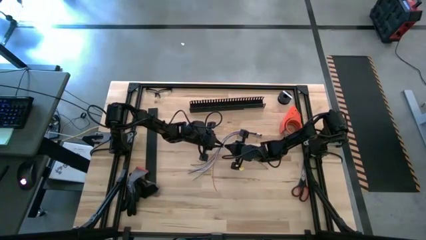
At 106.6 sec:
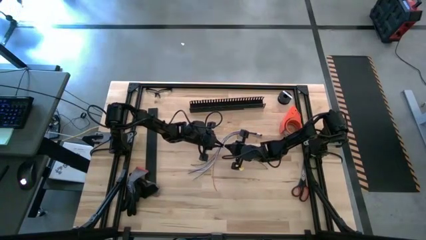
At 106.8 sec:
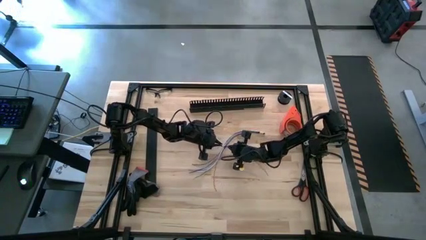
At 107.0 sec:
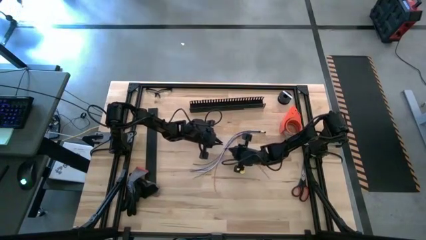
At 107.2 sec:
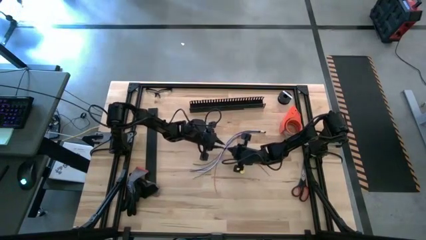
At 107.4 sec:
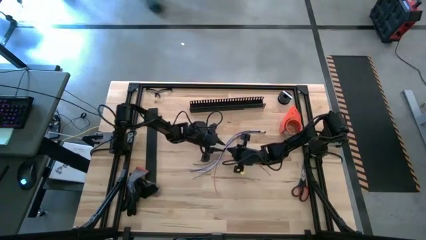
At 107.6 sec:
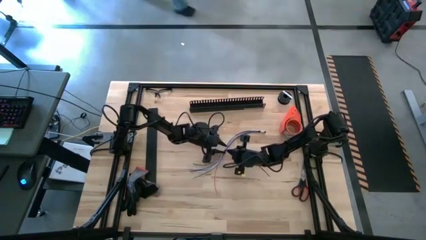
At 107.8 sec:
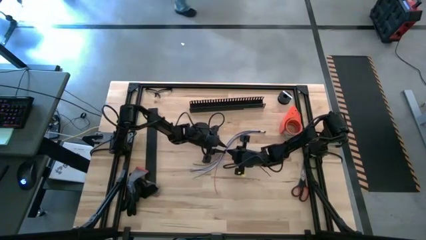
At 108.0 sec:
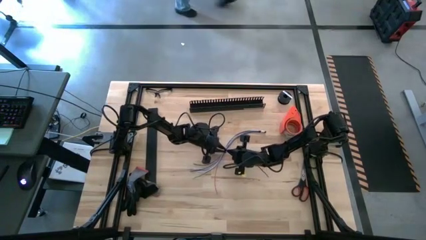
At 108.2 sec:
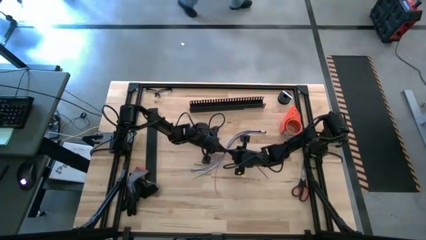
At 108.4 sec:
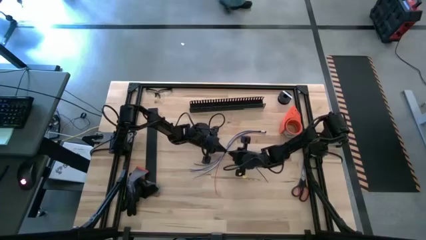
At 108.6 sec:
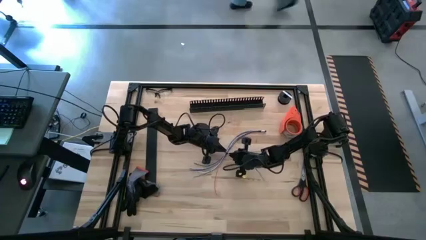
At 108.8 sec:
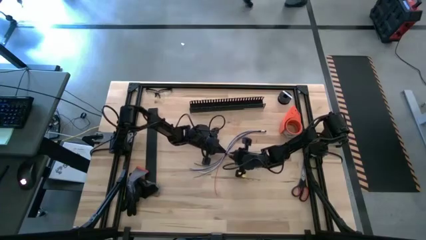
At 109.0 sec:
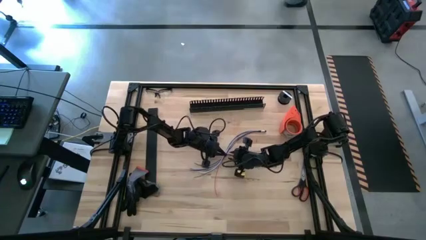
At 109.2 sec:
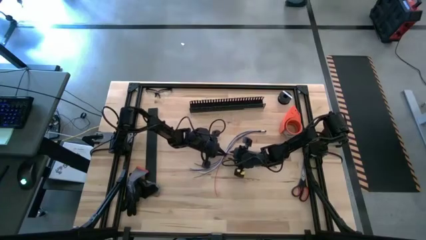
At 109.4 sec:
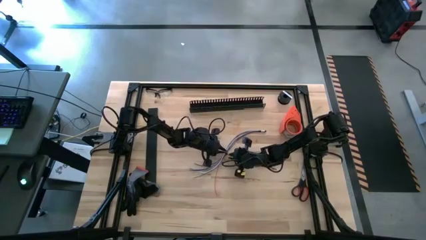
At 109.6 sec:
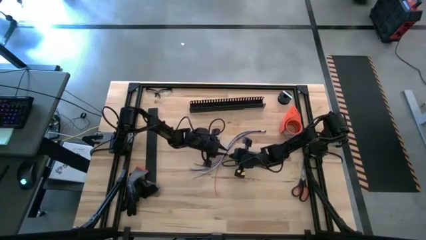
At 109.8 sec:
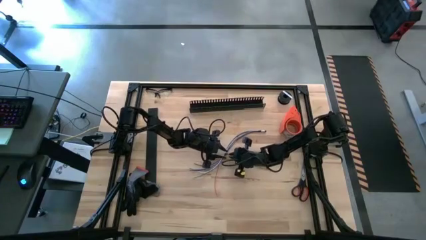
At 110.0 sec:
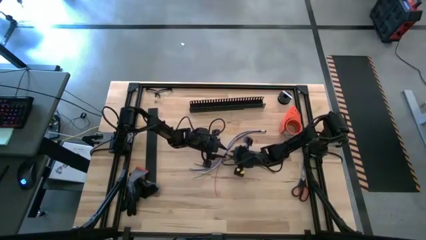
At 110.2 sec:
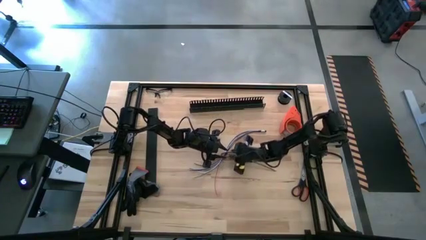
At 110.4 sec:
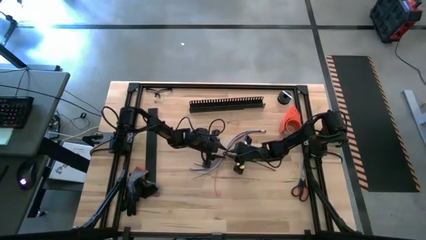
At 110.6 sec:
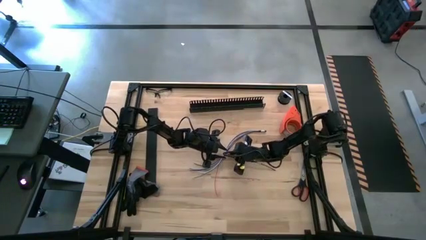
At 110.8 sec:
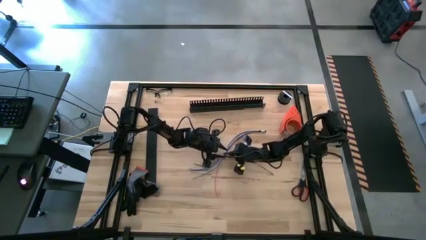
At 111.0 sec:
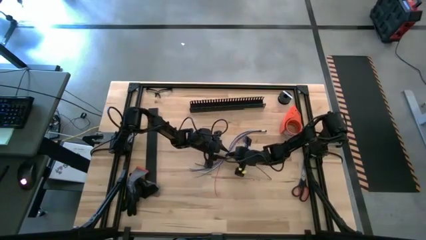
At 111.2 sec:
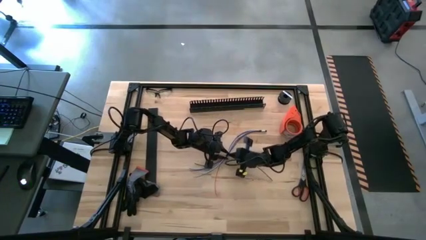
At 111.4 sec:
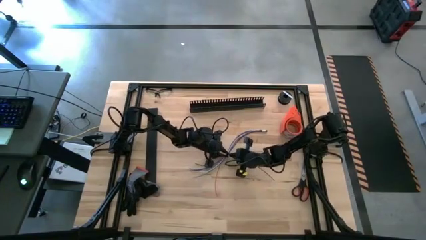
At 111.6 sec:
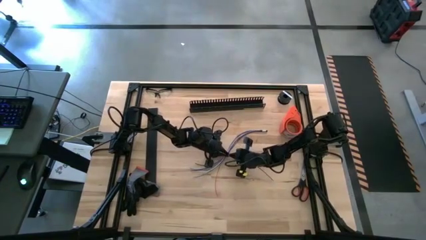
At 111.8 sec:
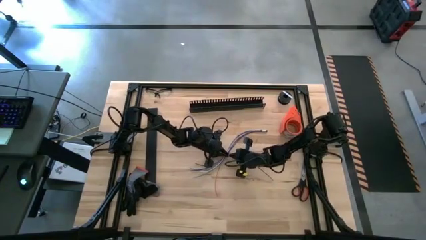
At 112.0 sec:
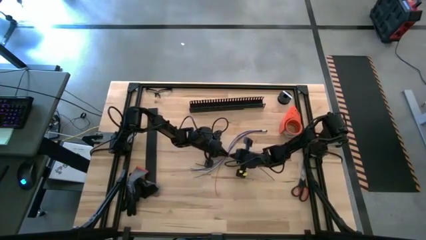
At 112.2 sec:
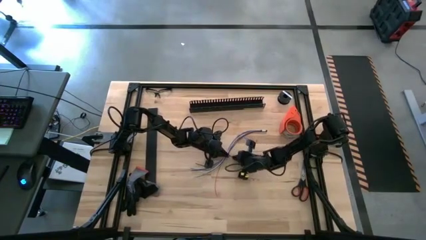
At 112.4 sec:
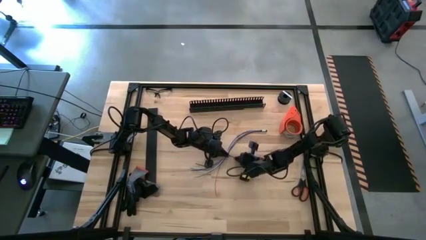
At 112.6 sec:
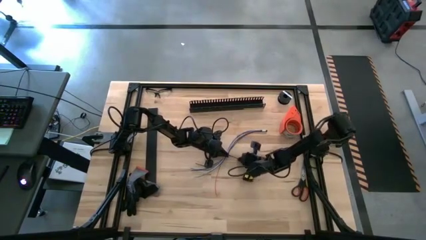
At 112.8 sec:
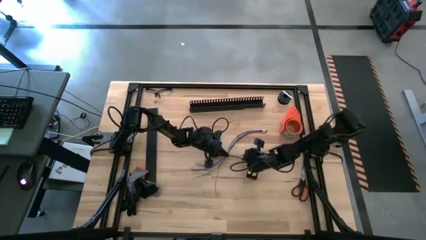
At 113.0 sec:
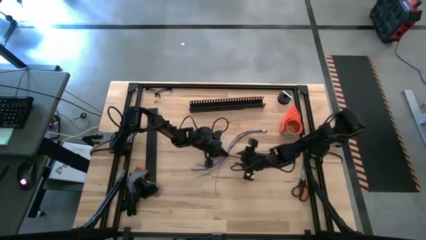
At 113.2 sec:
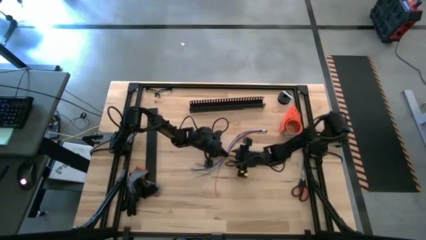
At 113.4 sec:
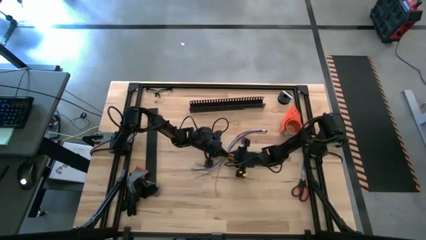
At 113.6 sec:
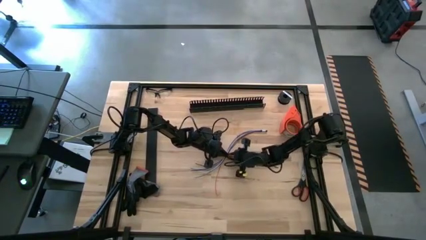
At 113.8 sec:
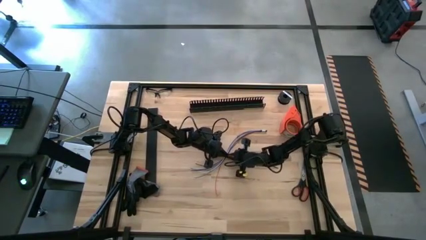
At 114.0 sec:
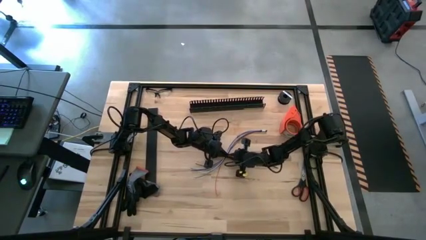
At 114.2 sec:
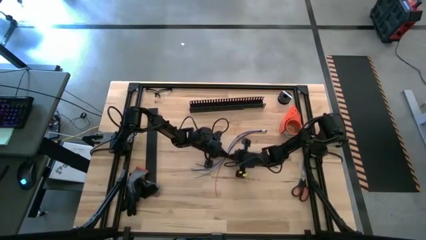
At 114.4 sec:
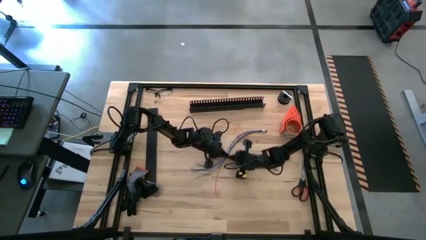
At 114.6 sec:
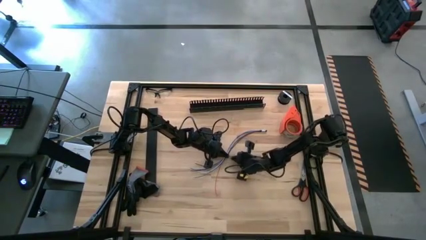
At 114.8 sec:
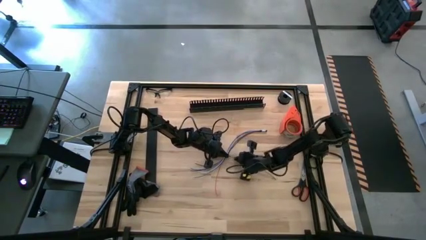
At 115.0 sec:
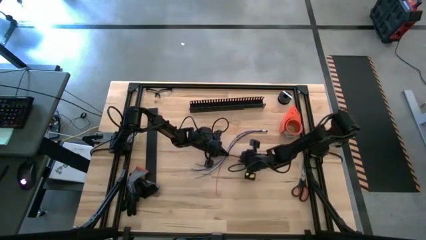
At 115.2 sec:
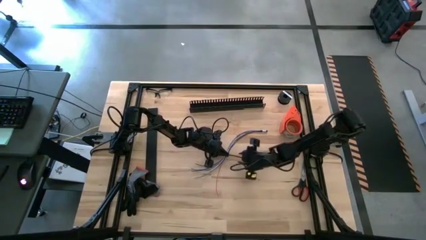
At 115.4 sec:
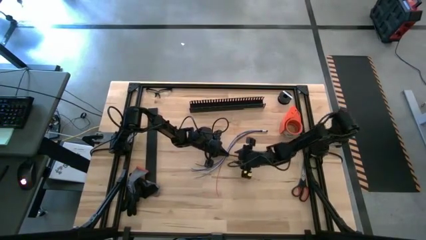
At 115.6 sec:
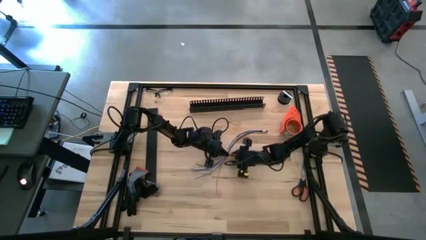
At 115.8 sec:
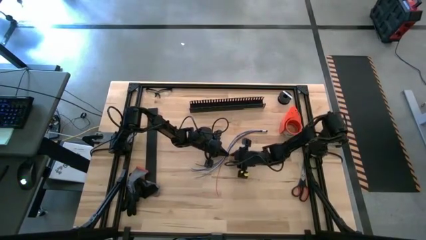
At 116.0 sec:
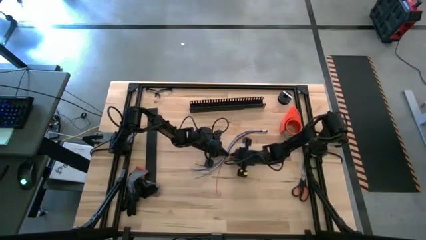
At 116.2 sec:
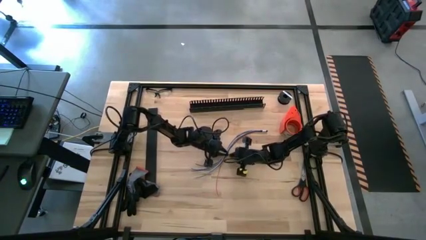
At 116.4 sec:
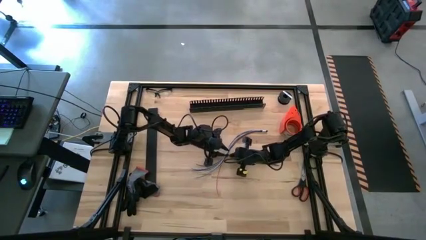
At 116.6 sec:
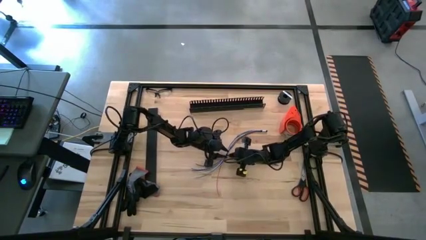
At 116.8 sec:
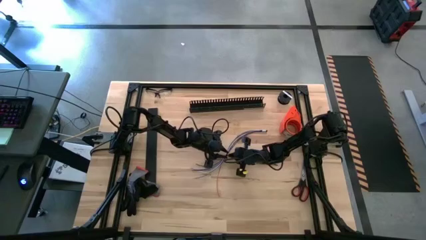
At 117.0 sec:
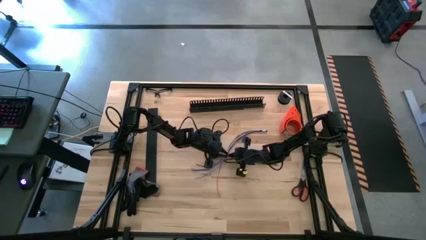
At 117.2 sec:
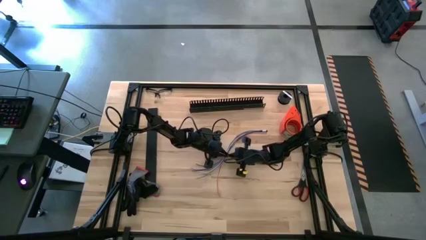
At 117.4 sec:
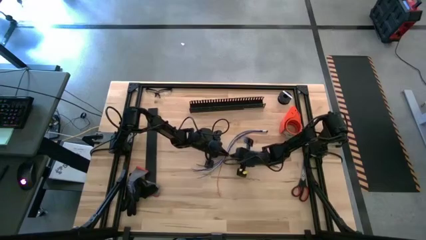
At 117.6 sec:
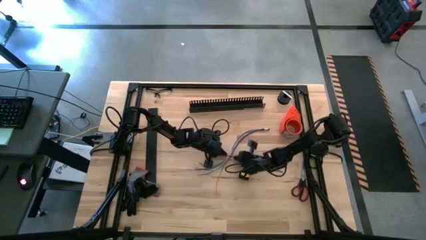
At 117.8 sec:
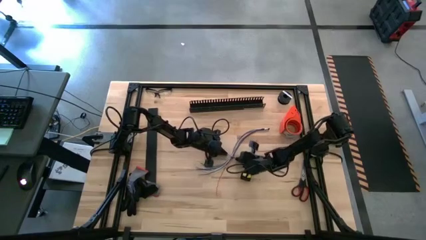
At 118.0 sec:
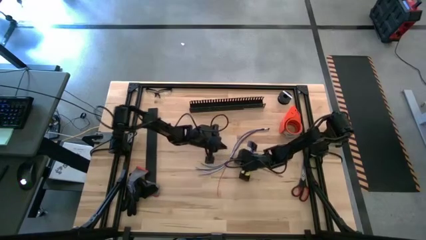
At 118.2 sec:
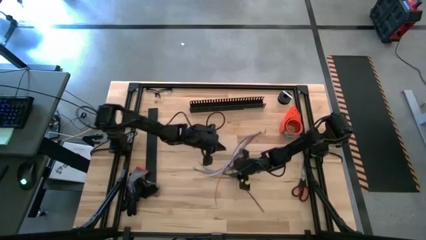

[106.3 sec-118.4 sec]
Task: Ziptie cables
Wrap the zip tie around the cable wire

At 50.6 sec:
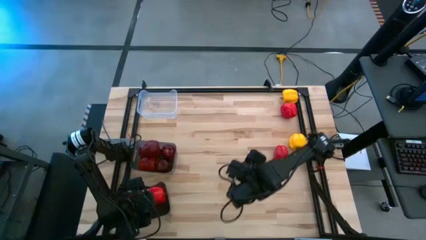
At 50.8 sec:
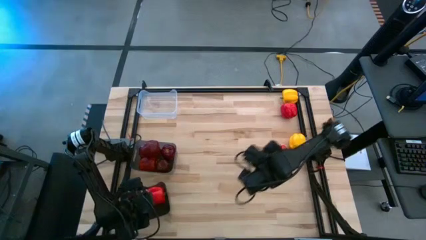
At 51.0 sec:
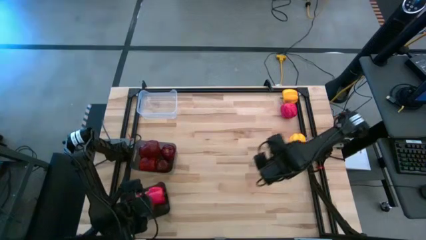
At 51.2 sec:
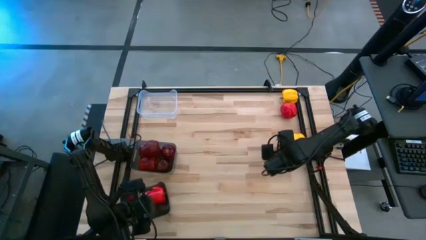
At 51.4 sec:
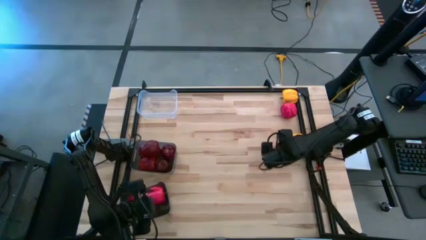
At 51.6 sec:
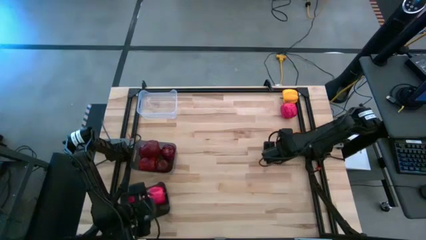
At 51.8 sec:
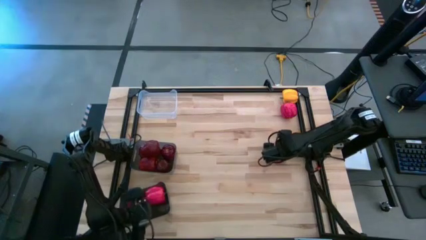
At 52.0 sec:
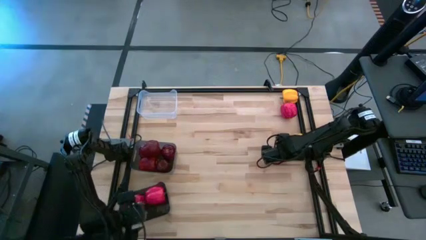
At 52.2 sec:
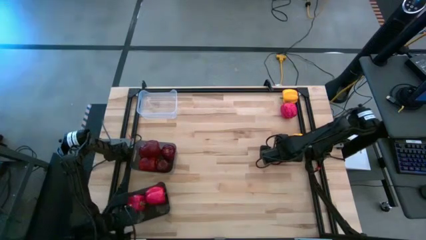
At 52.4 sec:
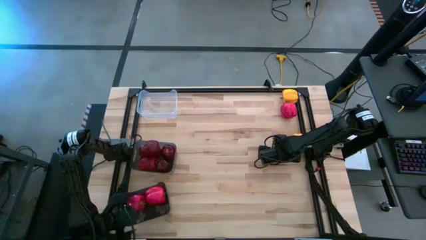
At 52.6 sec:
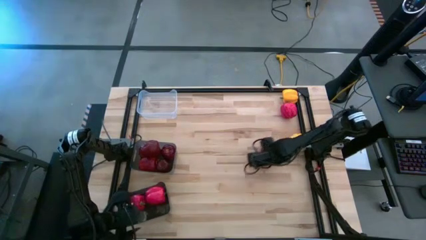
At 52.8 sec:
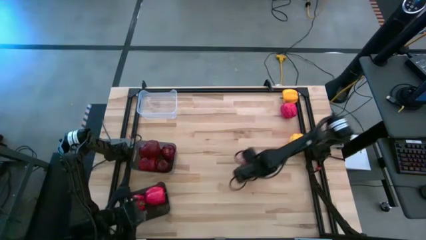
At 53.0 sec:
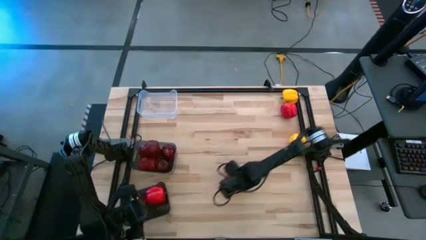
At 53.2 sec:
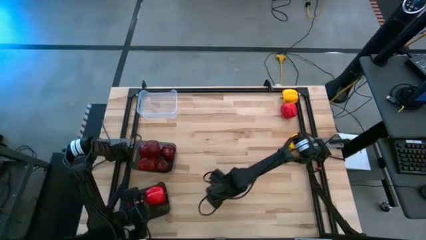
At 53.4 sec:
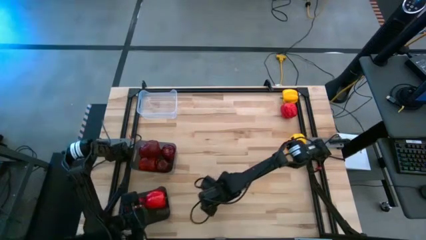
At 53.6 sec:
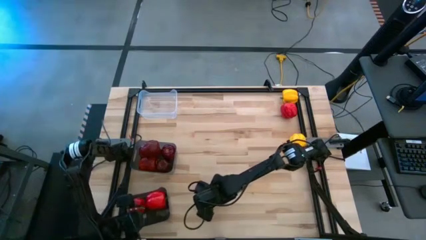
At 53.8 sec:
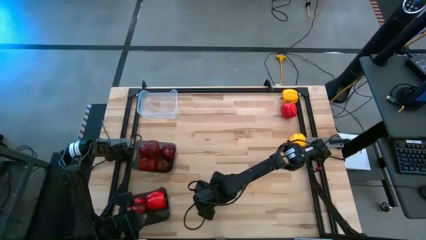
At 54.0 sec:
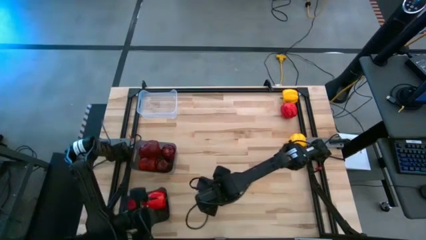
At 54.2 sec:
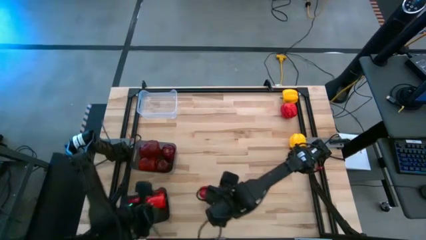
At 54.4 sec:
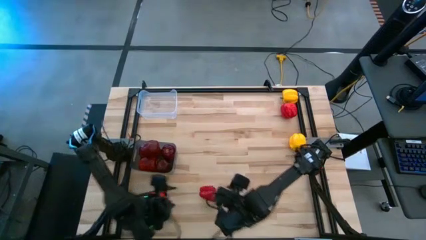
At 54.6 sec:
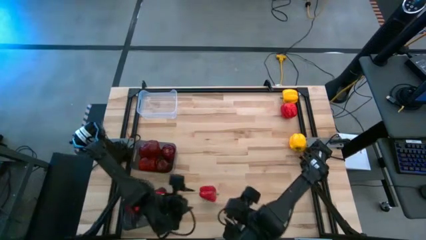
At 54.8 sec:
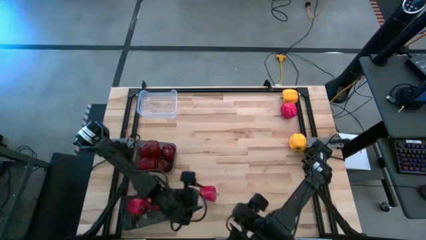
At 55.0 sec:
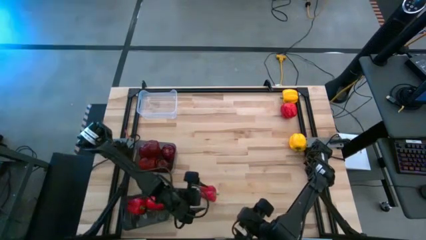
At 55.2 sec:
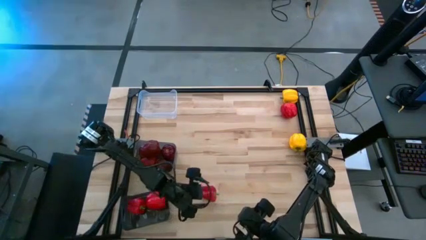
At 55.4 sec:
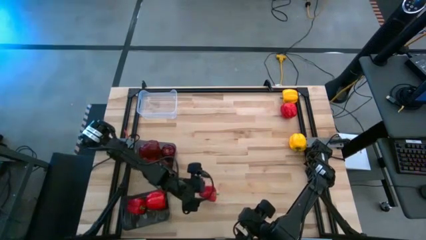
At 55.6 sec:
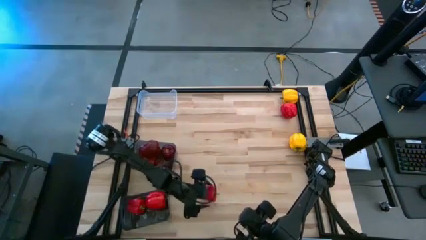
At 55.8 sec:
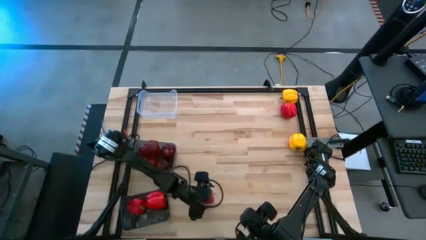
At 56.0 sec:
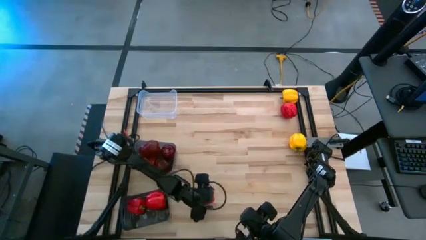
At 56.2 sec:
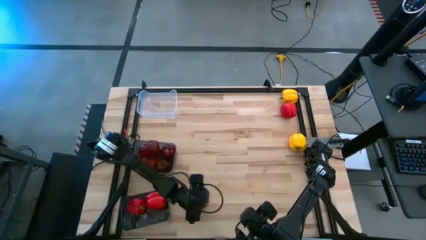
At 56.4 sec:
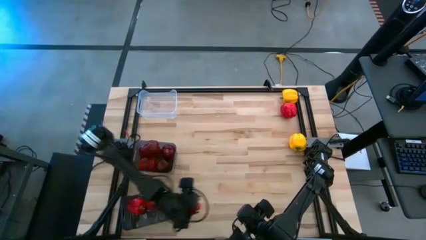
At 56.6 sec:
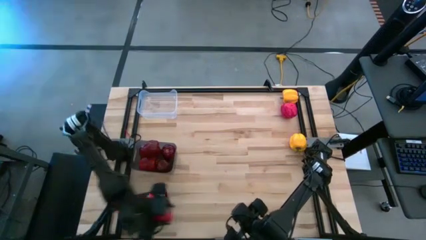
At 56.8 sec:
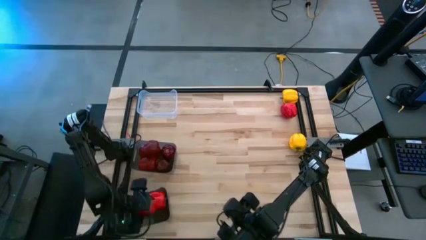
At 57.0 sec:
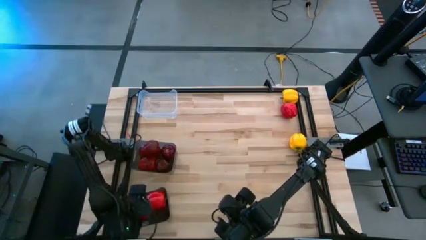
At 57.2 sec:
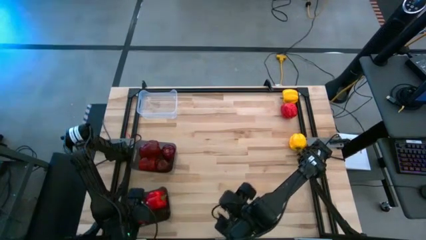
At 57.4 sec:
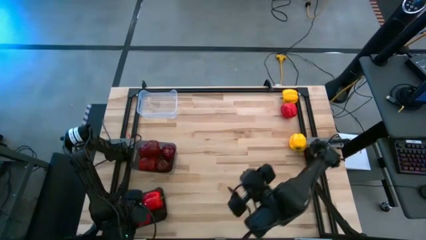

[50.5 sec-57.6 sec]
Task: Sort produce into baskets
Put the red bell pepper into the bottom black bin
